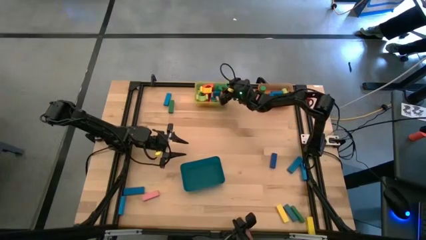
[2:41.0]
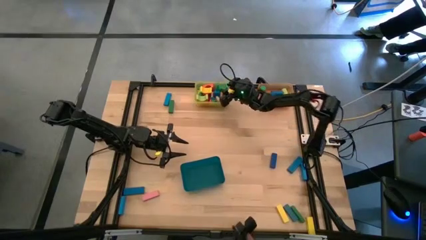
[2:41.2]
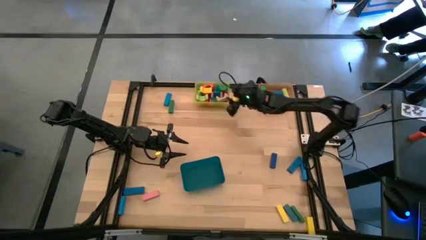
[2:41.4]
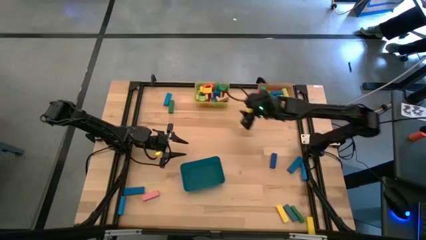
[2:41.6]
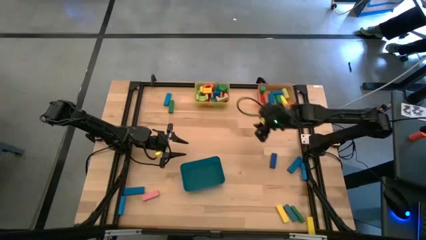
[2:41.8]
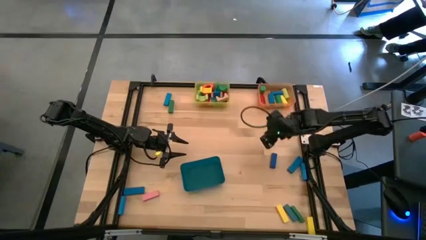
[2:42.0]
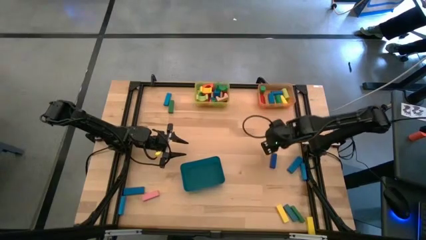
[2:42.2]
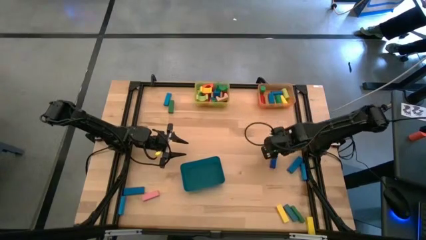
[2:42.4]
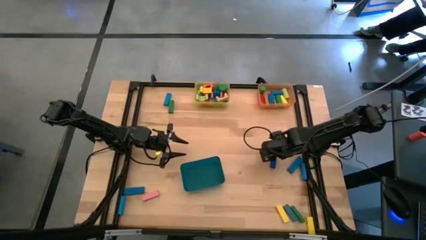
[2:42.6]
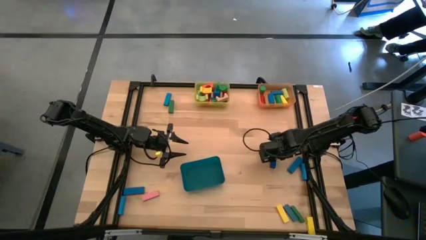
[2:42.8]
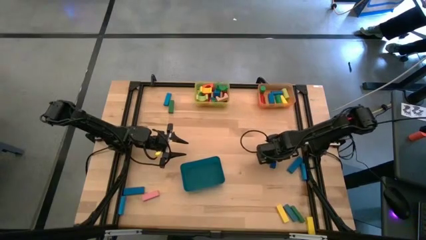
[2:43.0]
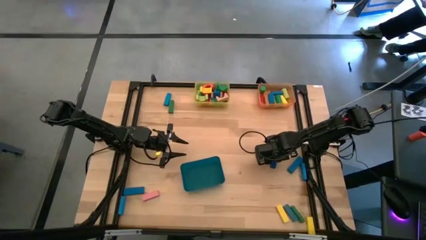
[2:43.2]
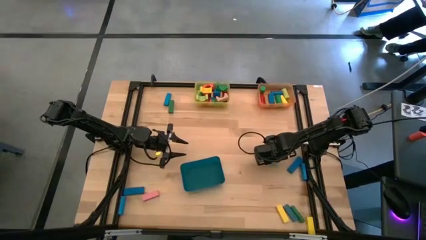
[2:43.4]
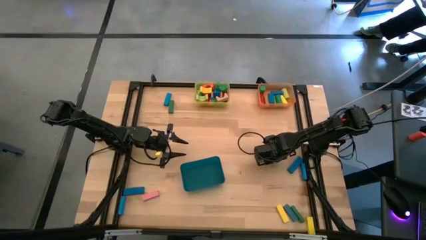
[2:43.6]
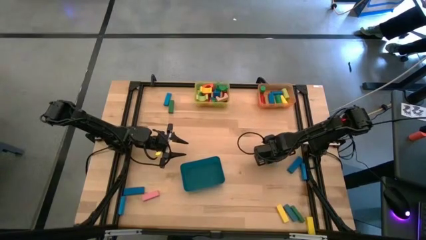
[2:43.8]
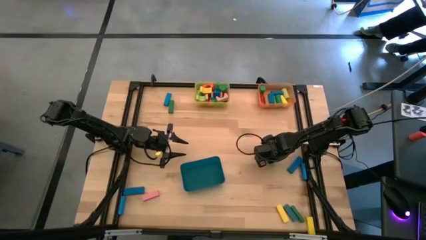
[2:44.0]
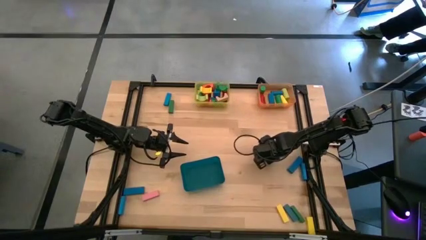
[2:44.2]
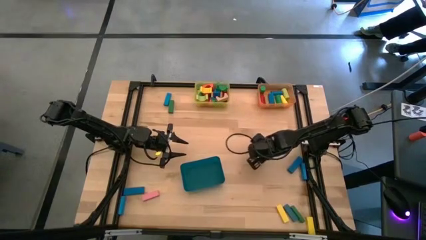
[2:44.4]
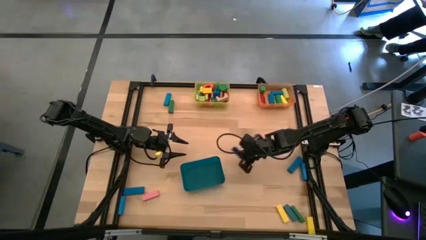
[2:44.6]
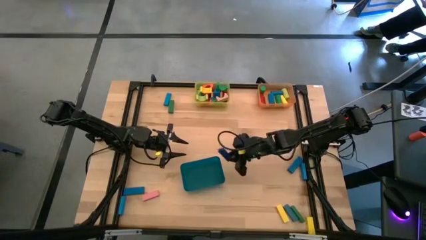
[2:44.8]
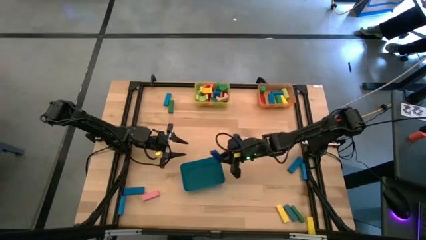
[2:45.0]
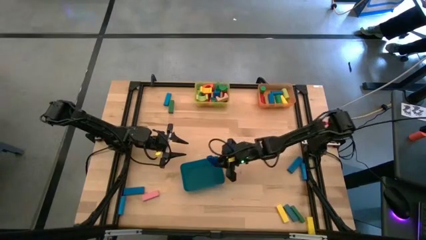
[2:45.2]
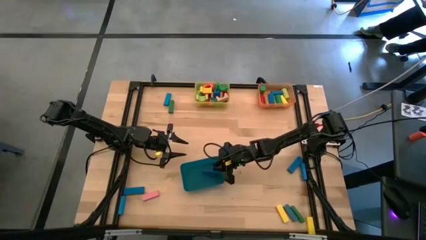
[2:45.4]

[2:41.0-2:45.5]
Task: Sort blocks by size
Put the blue rectangular block into the blue bin

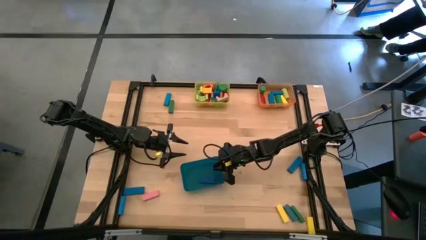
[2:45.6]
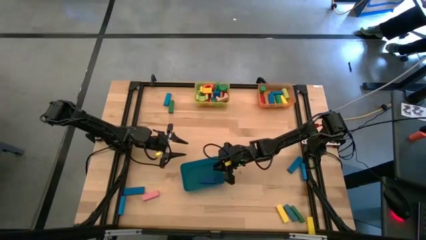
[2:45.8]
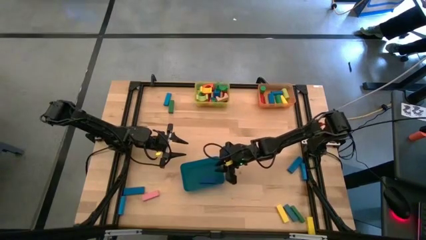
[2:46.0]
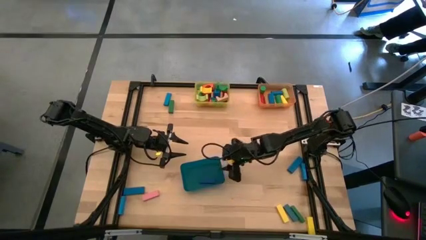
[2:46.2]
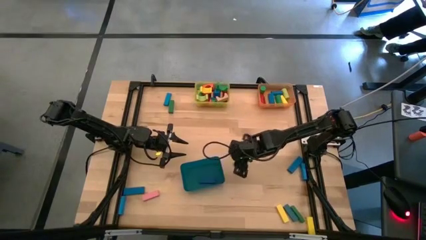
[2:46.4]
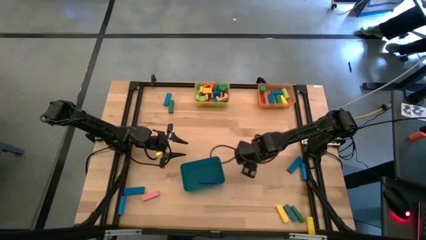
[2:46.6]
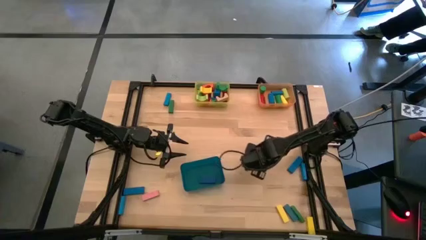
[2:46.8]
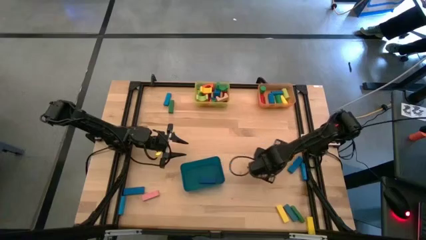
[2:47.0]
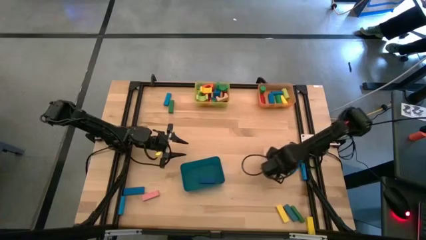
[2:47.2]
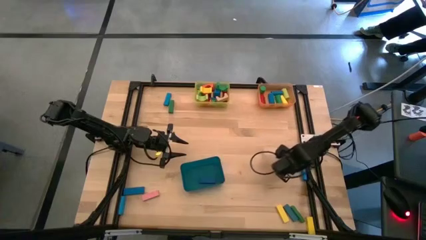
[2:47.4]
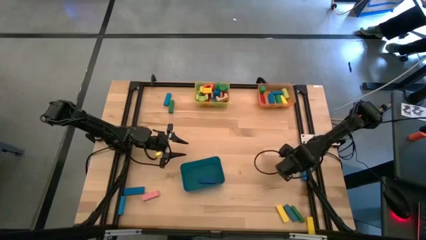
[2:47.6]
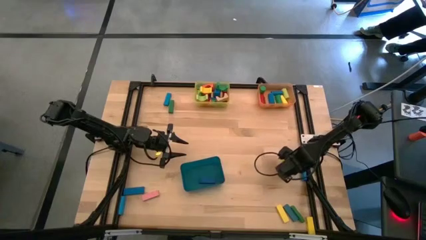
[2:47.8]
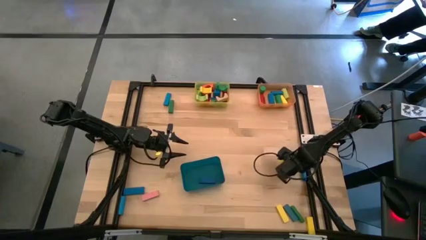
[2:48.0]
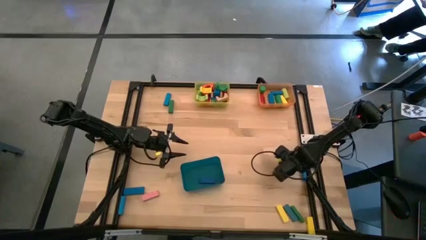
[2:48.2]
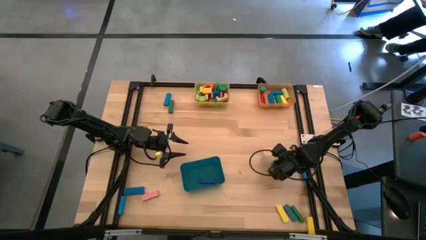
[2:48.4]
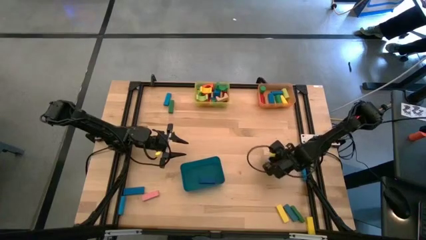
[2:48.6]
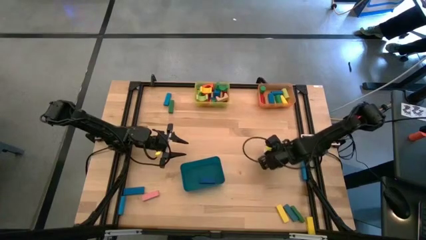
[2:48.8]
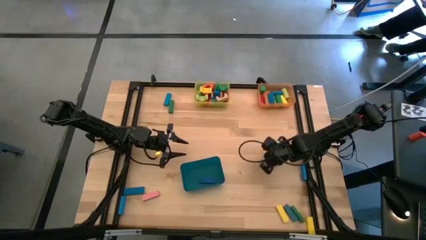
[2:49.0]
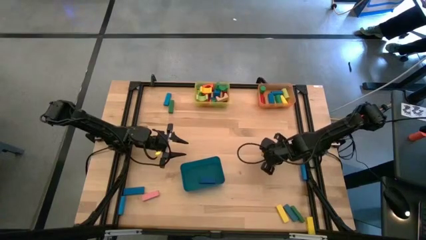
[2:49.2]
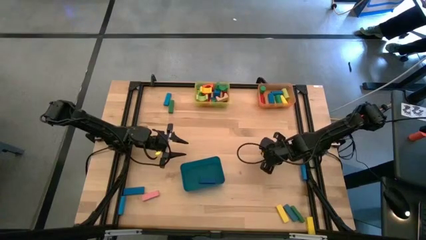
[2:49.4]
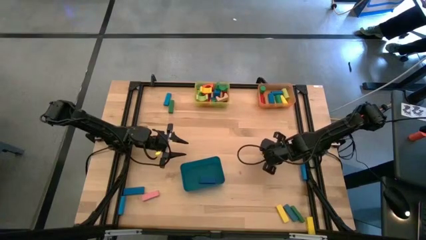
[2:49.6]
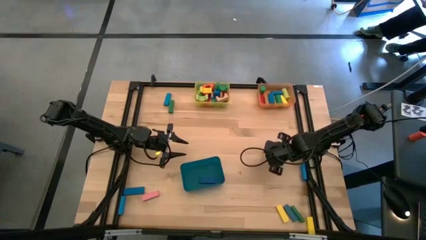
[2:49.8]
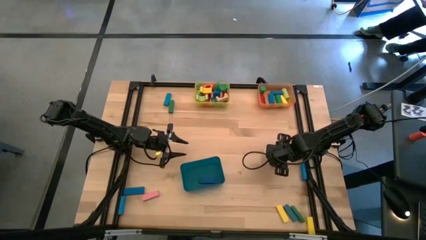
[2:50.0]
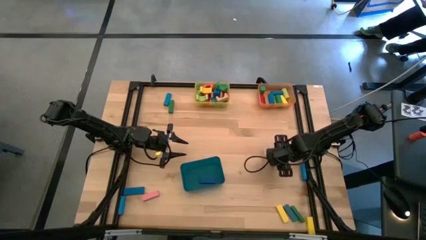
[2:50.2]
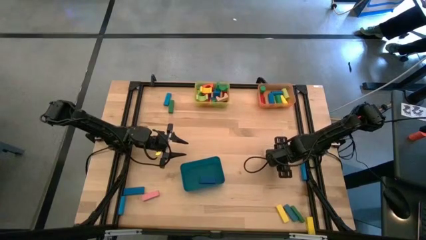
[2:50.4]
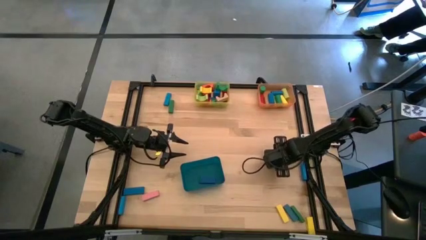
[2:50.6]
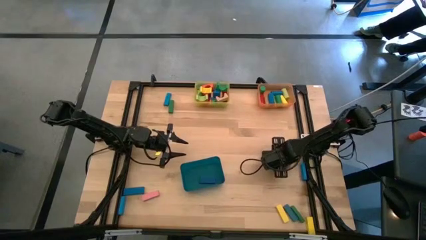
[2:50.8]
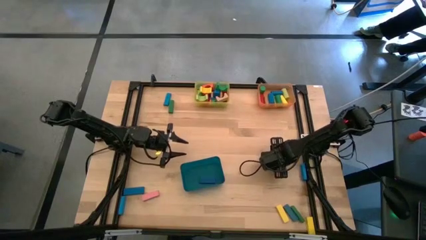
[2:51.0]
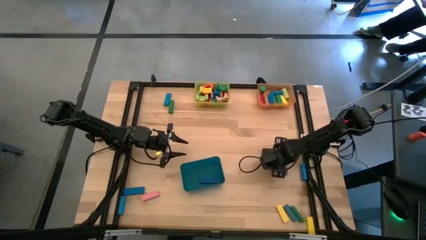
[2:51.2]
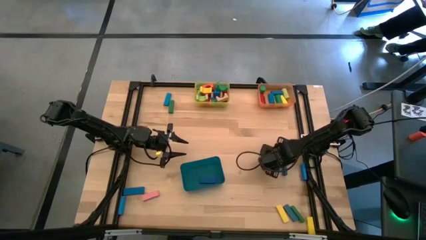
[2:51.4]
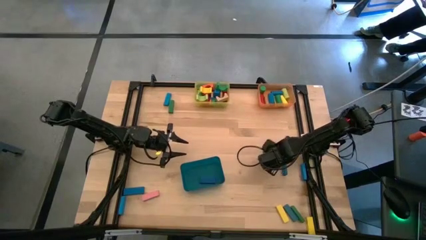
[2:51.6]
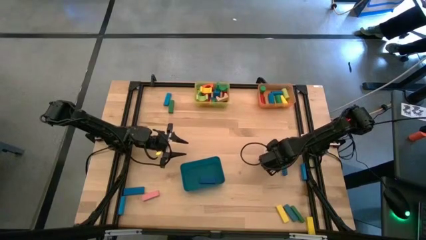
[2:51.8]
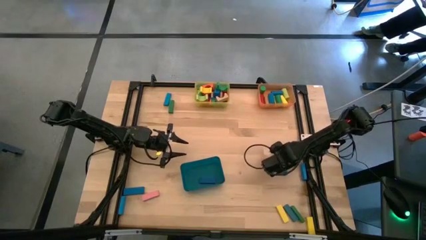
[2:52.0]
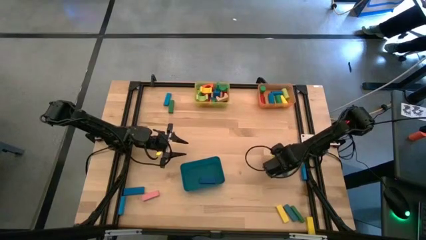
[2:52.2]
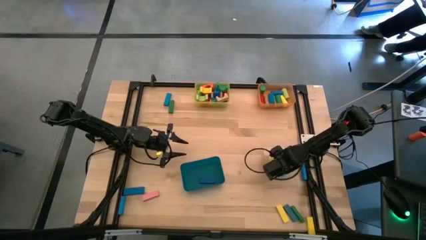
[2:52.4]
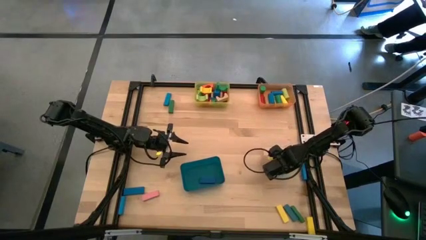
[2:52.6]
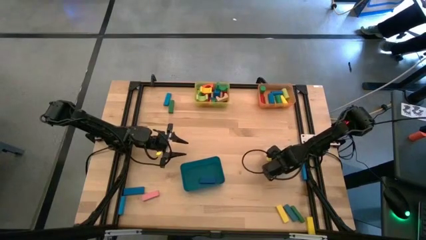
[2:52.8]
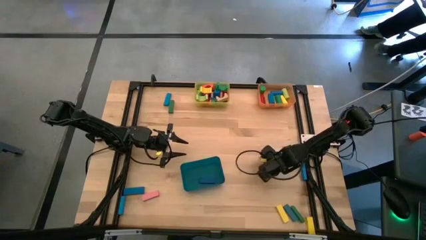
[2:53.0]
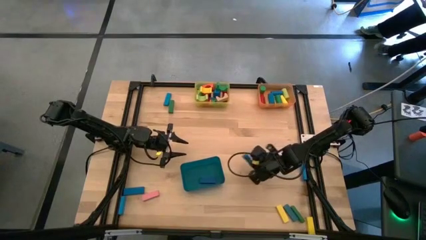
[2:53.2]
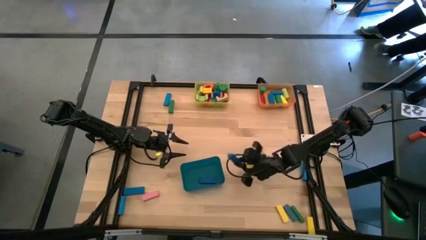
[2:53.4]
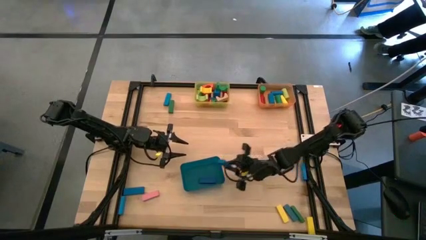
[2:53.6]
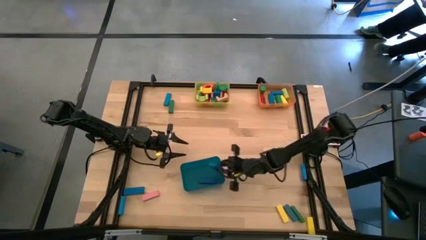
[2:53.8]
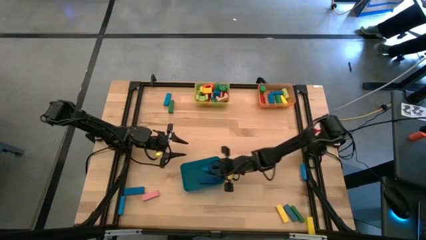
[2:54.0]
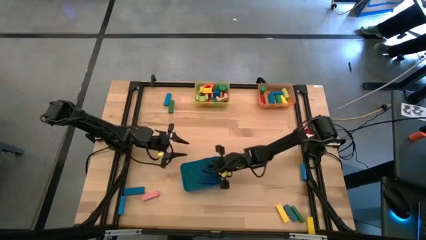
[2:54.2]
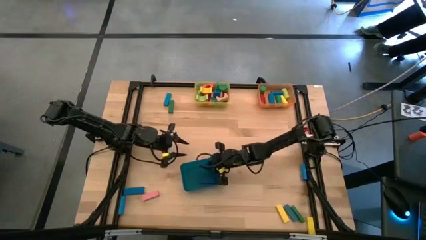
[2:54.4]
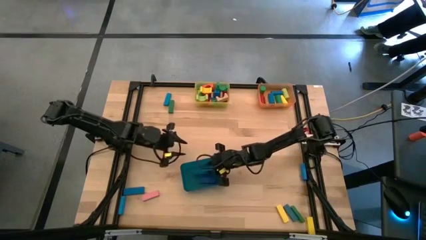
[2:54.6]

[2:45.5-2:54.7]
Put the blue rectangular block into the blue bin

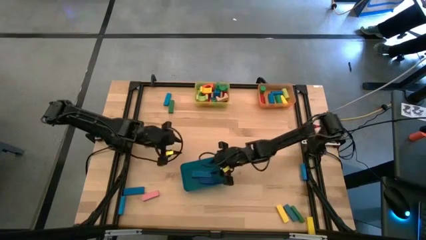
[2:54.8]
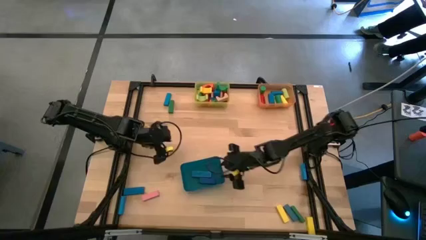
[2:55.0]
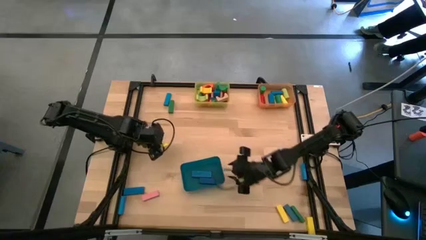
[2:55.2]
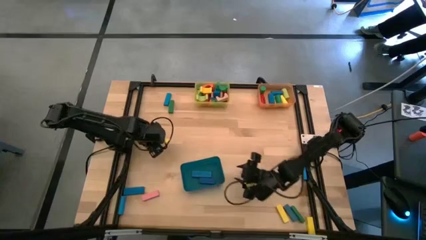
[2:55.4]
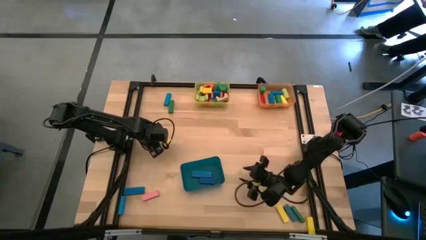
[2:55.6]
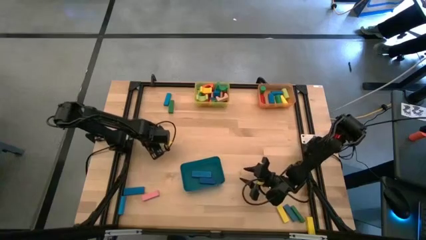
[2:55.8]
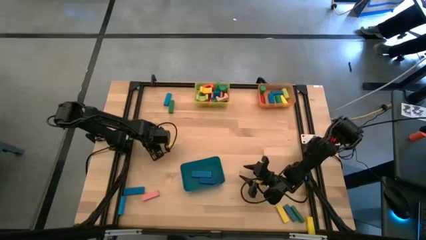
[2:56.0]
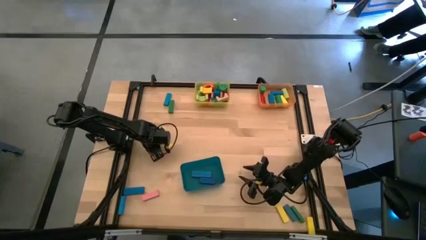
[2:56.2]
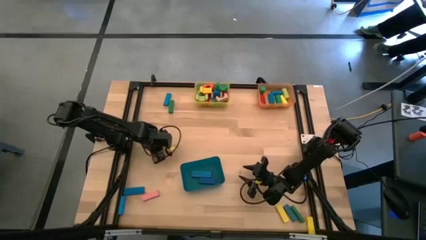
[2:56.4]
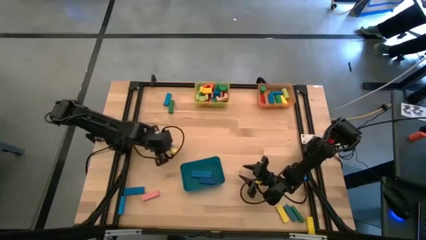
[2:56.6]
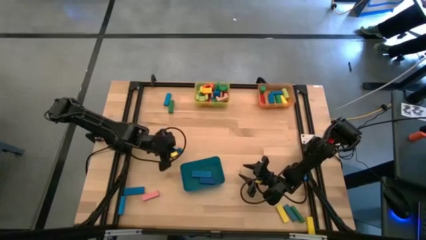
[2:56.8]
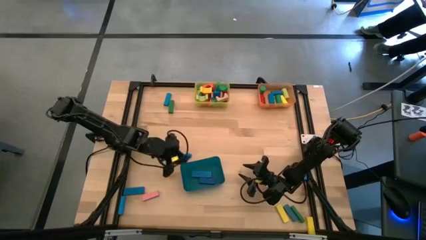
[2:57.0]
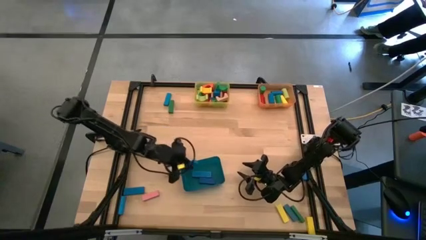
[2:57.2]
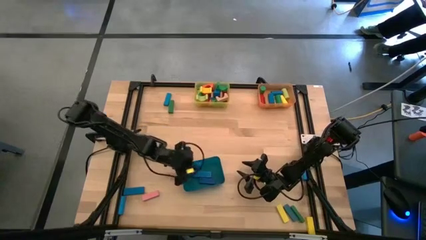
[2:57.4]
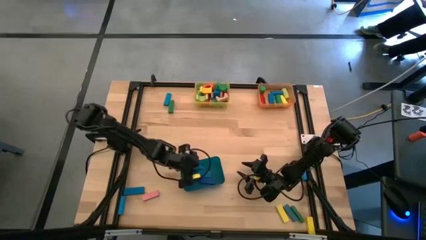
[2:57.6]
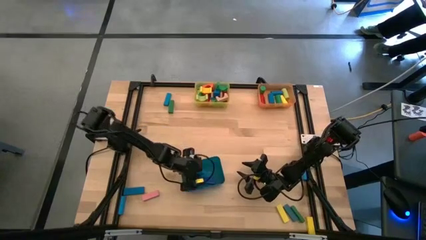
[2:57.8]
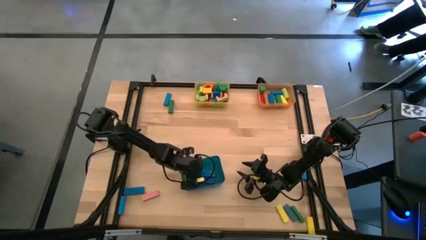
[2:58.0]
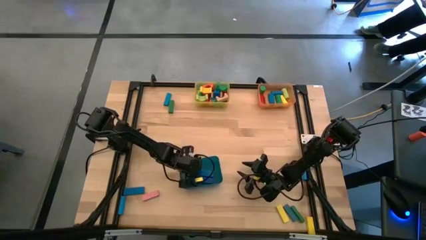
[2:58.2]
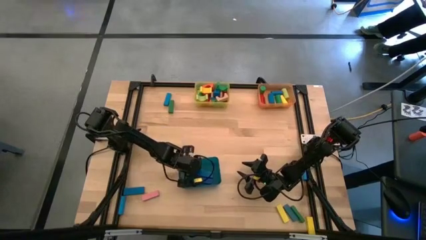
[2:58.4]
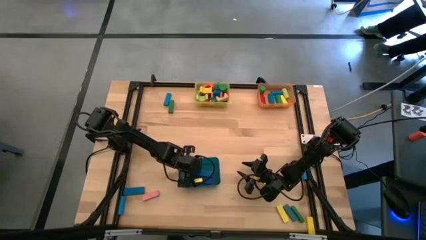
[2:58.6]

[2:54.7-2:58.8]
Put the rectangular block into the blue bin
